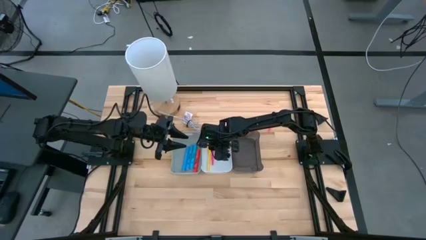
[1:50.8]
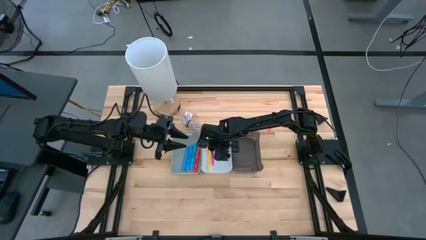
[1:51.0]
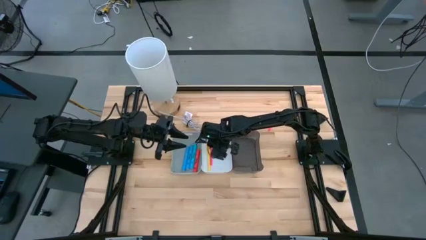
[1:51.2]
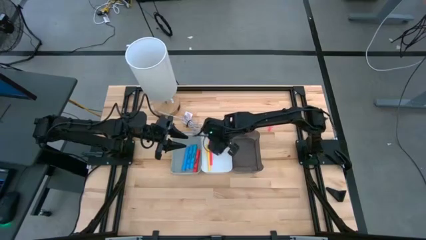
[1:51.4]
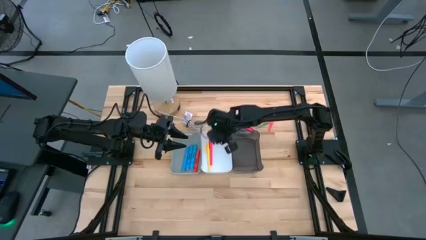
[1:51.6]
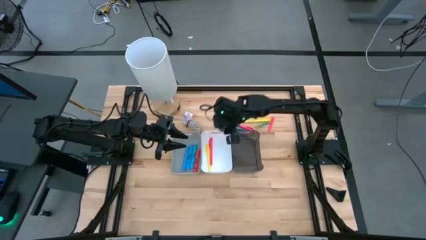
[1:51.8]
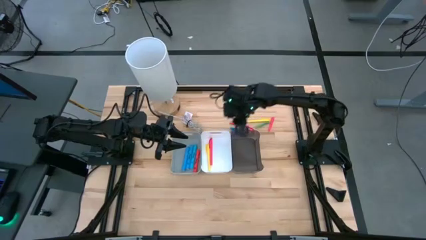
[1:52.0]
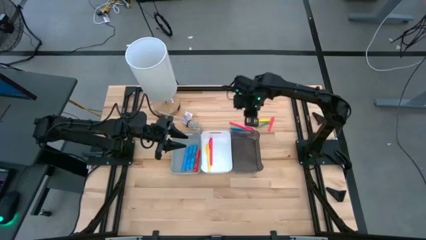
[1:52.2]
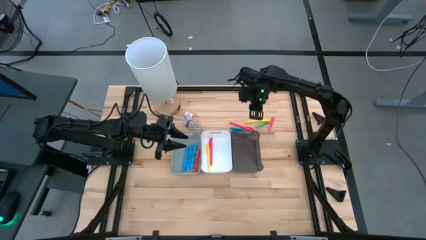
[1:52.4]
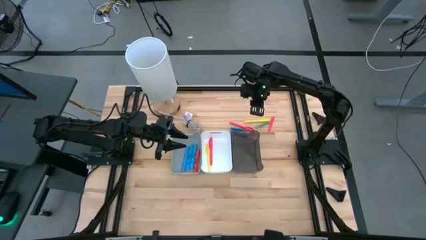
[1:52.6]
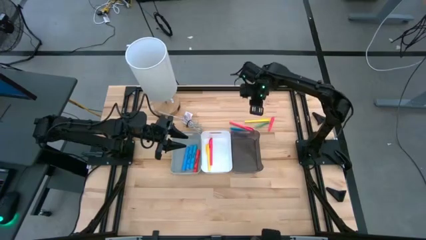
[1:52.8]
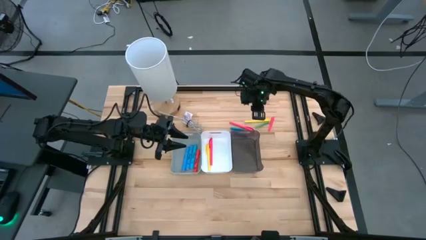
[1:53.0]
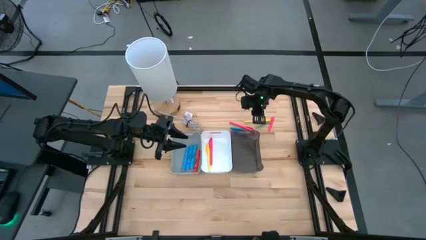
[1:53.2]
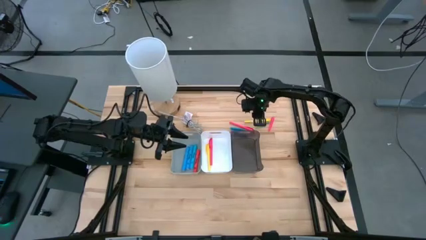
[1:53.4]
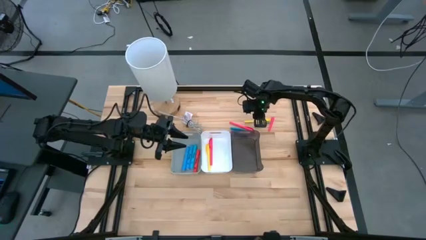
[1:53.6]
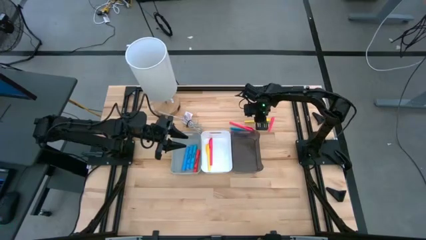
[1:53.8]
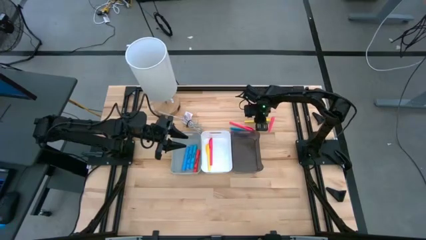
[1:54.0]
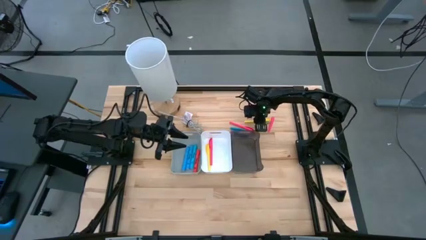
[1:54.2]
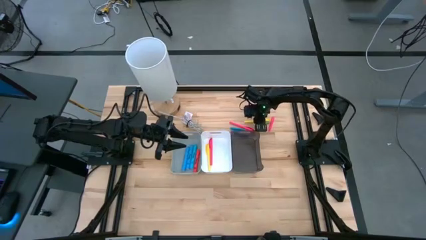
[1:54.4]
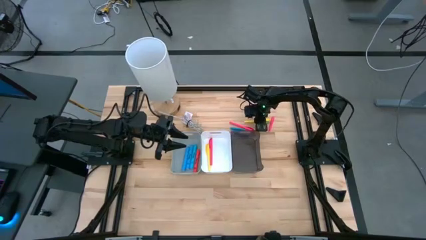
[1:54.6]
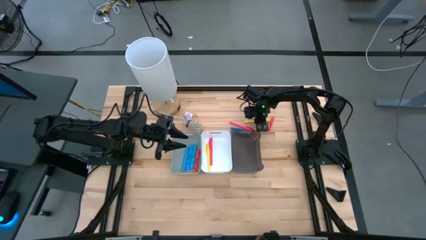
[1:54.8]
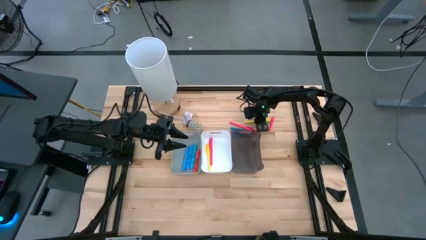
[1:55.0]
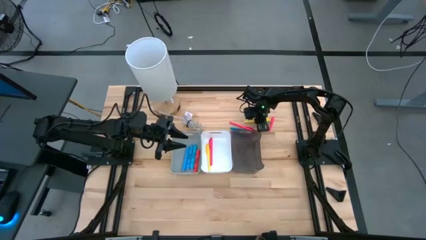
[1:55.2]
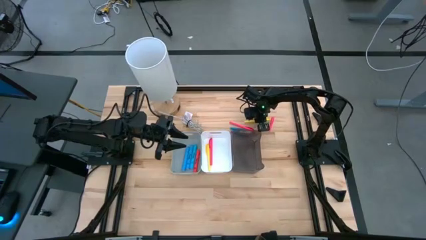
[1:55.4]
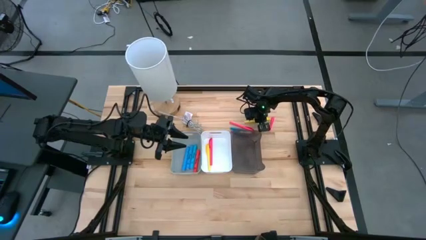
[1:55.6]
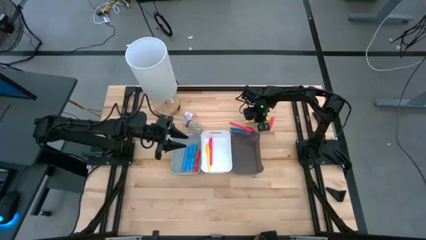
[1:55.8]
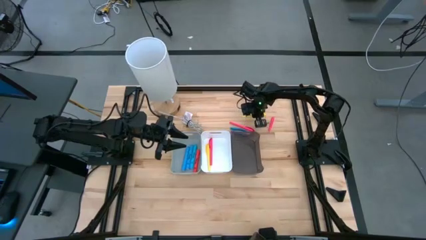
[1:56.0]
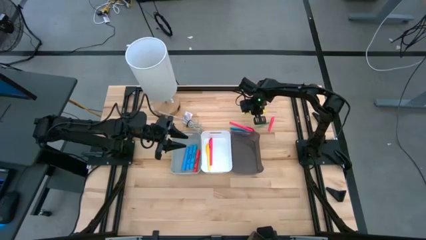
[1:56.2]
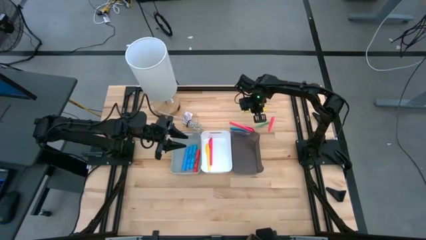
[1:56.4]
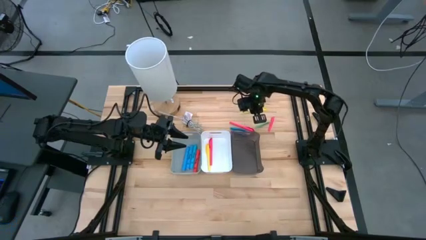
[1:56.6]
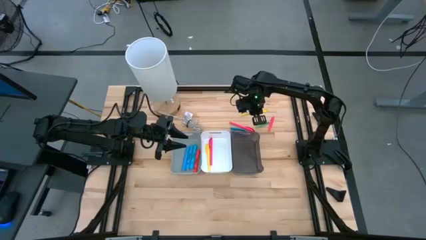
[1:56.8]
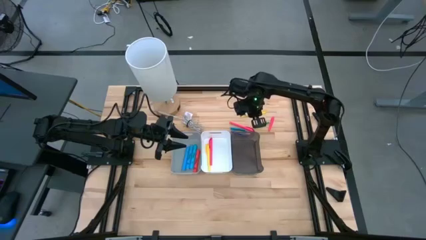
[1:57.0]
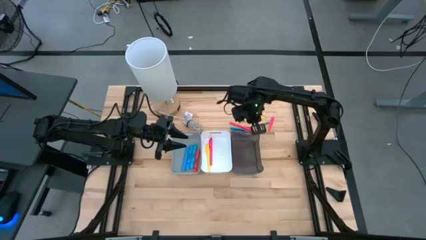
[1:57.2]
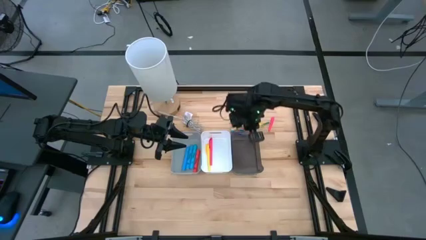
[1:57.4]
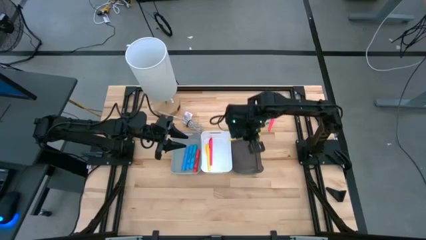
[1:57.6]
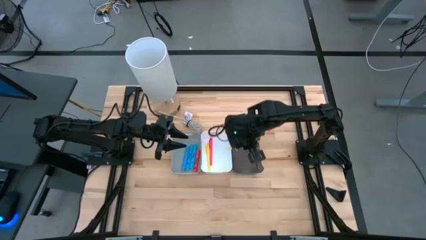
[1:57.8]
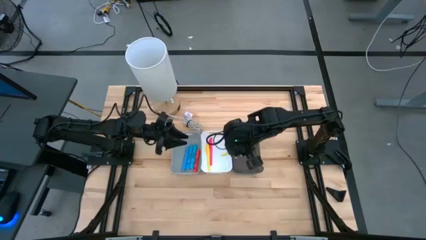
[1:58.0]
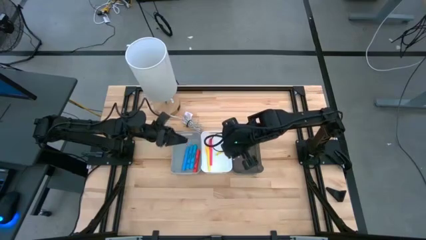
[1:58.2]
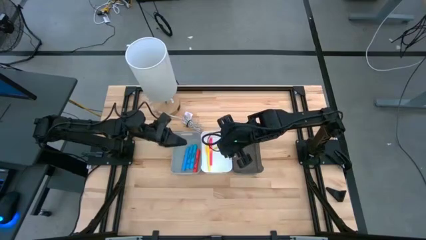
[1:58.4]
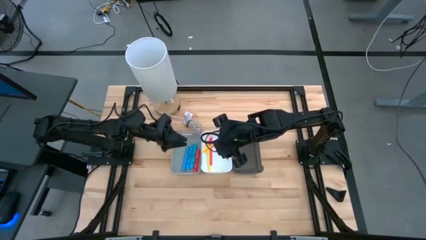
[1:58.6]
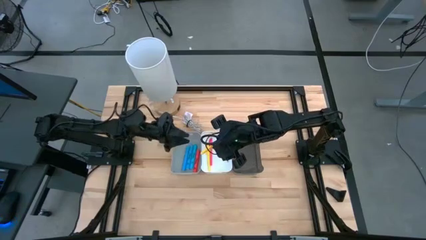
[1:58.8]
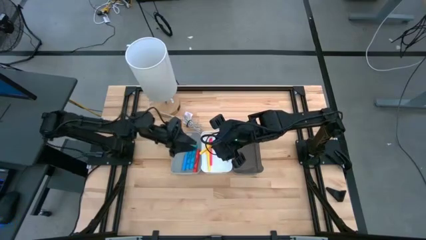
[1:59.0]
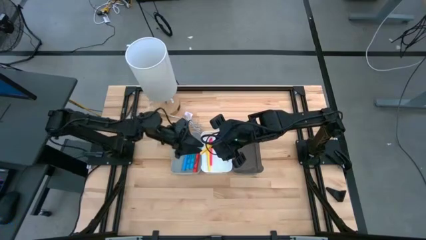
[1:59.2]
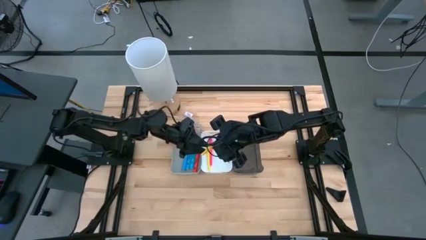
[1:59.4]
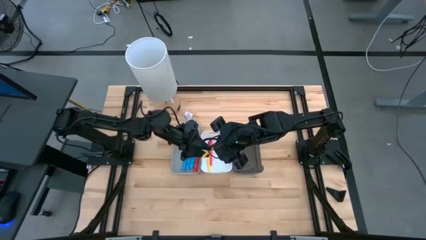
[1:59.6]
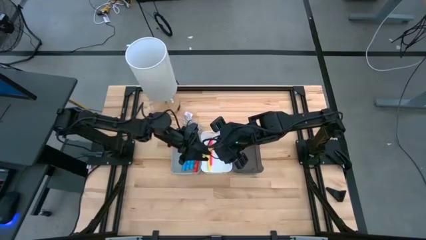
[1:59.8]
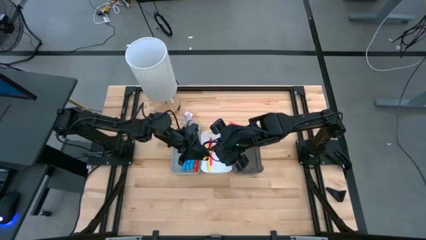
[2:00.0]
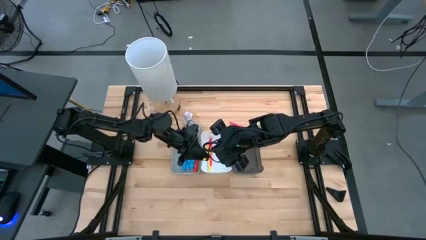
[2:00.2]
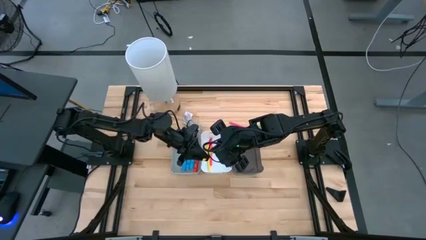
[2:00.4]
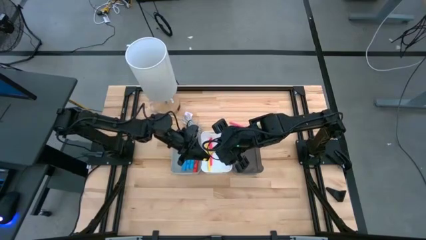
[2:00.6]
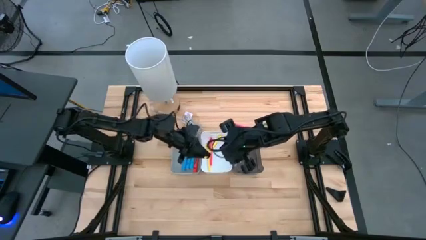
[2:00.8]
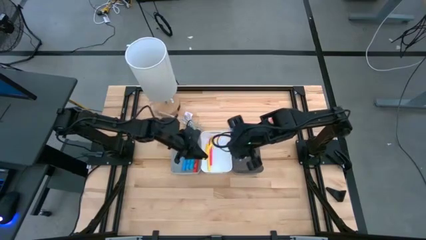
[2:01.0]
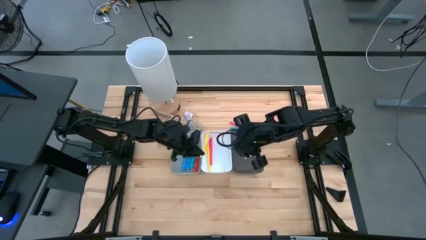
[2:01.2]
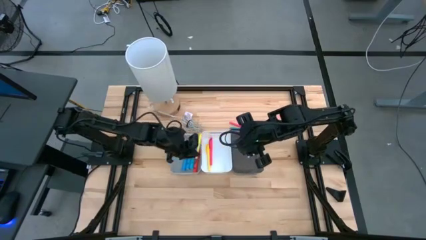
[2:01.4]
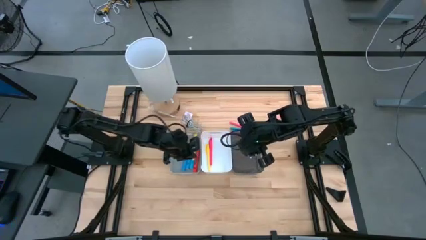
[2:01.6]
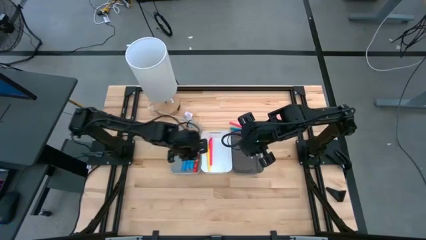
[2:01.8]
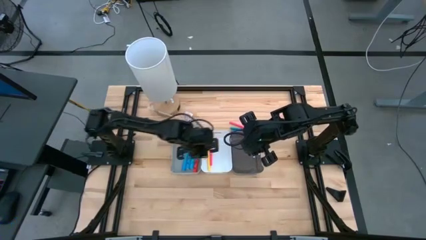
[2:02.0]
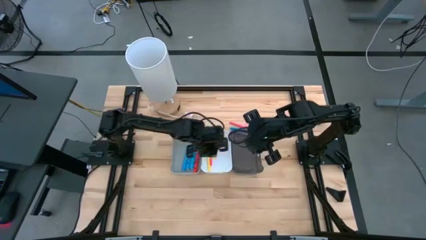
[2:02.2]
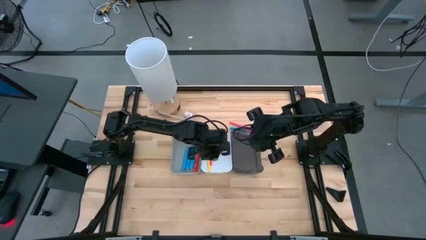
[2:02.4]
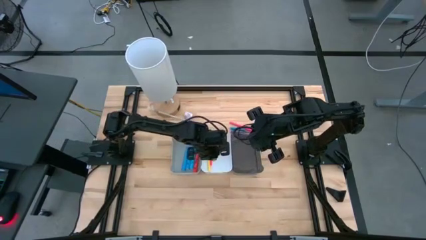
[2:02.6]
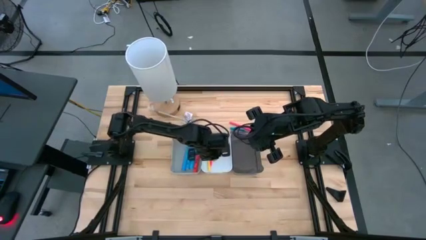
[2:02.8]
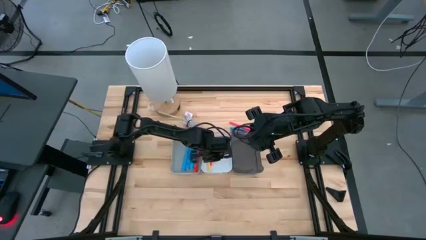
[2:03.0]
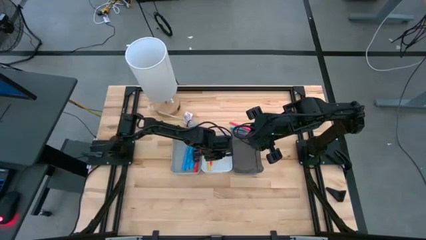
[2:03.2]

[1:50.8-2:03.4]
Task: Pick & Place Markers
Put the yellow pen into the white bin

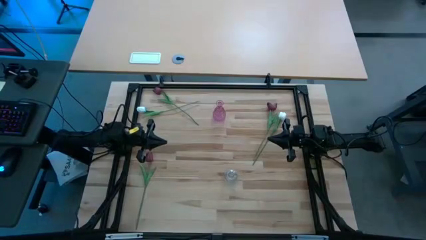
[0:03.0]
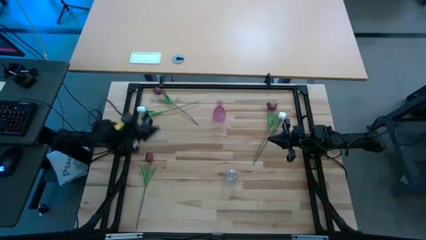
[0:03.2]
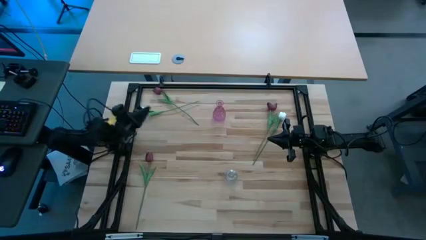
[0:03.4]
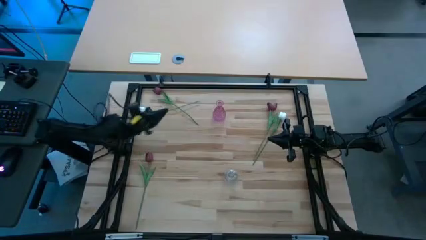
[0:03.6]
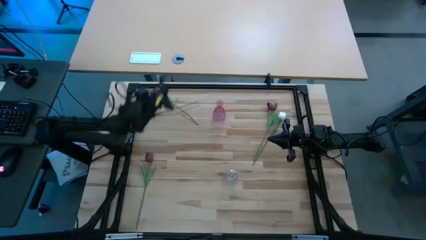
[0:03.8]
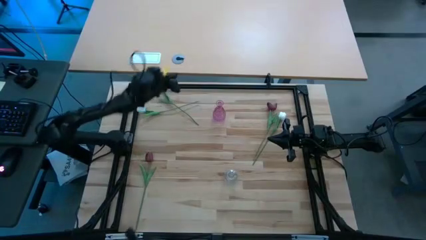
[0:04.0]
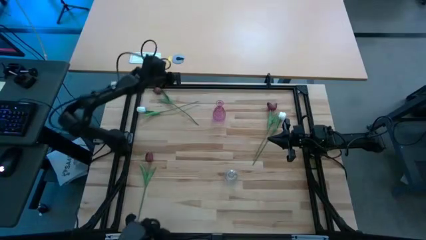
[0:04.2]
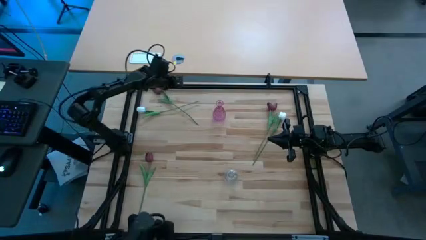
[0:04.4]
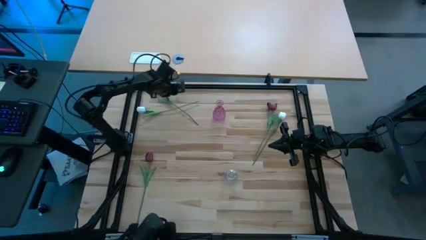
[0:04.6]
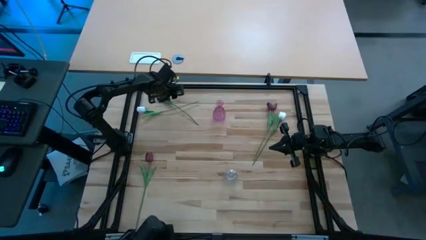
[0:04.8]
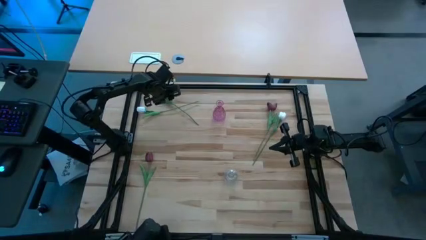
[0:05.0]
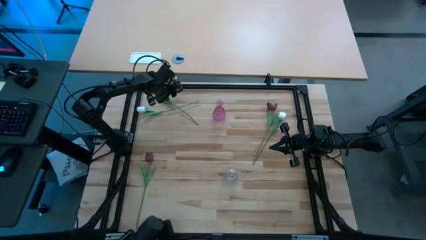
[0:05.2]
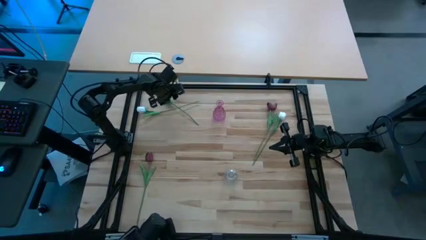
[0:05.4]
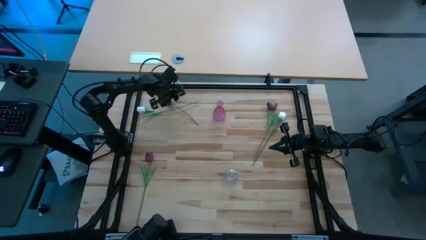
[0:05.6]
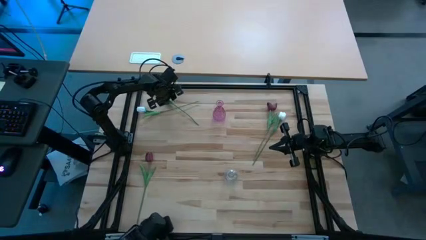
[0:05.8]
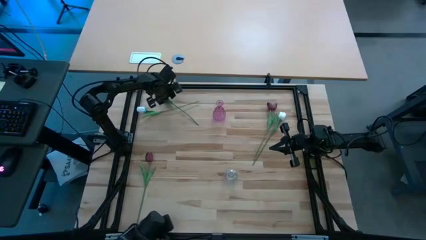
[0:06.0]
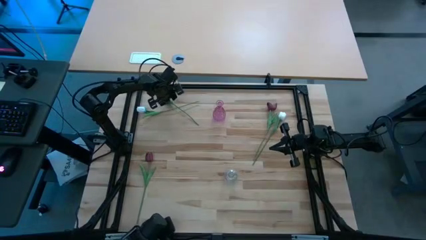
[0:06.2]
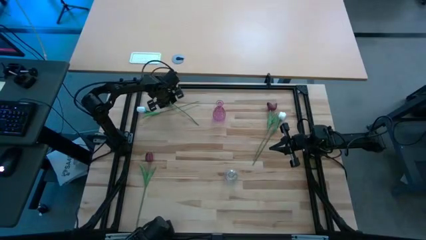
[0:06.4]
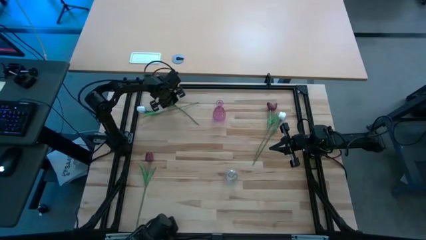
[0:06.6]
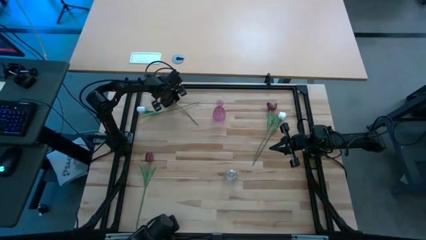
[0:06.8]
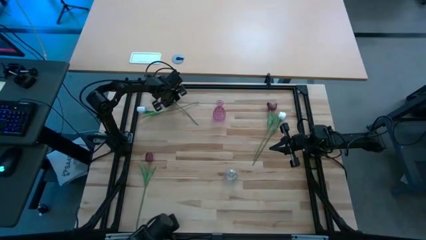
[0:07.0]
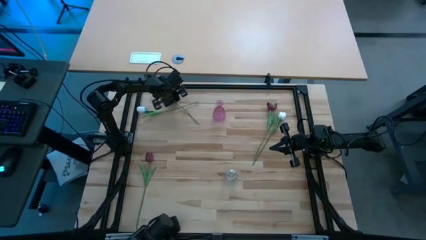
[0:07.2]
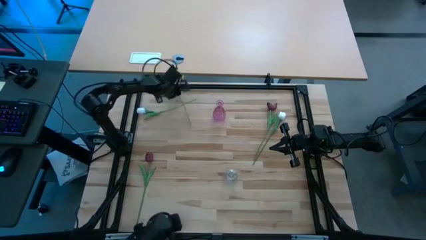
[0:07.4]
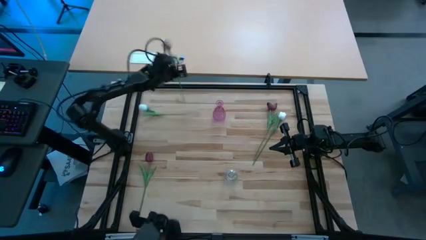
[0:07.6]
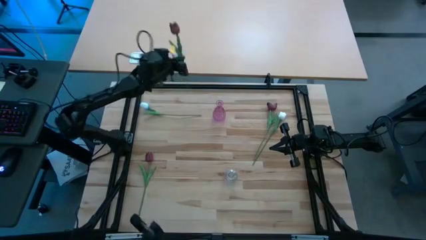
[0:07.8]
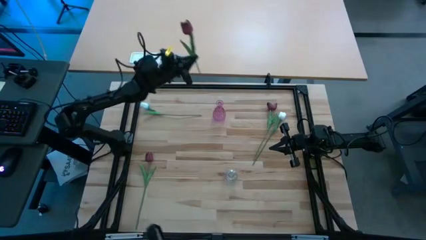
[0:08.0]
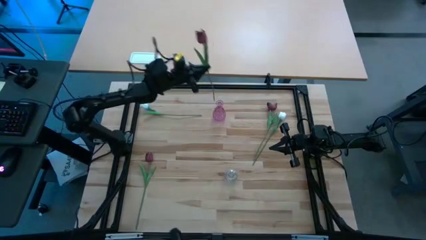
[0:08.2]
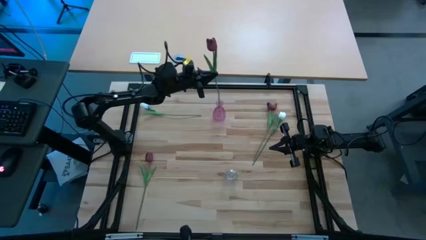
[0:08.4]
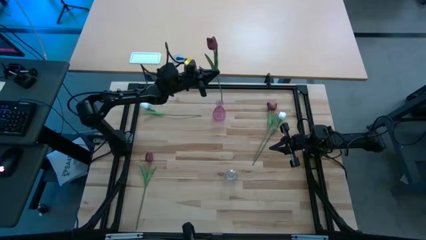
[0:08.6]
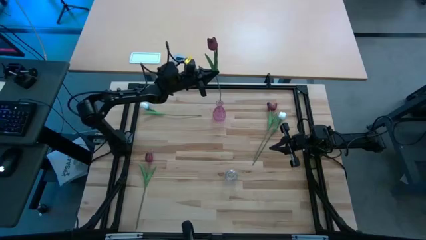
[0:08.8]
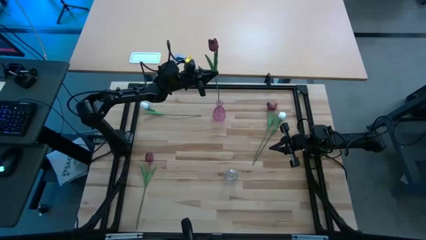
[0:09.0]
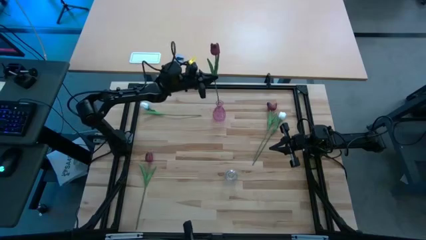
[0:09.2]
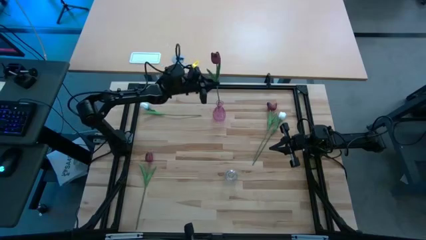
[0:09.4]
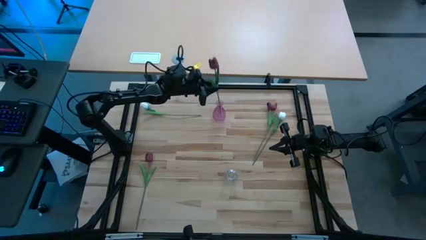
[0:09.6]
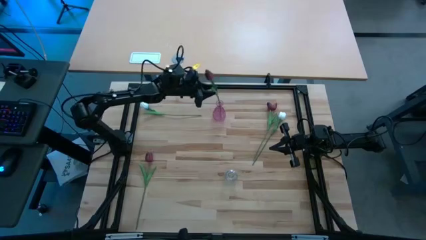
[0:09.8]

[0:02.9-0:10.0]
Task: Sort flowers into vase by color
Put the top left red flower into the pink vase
